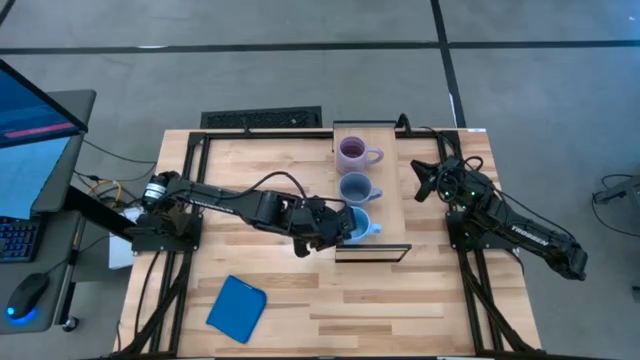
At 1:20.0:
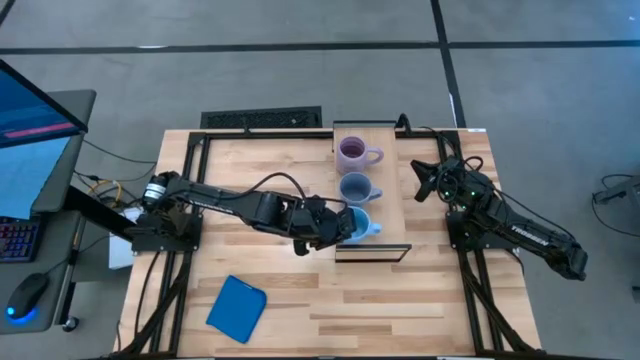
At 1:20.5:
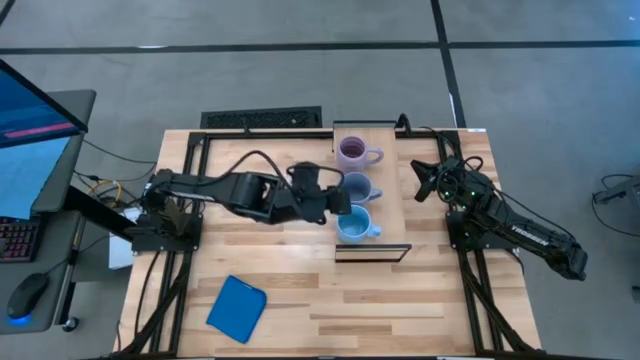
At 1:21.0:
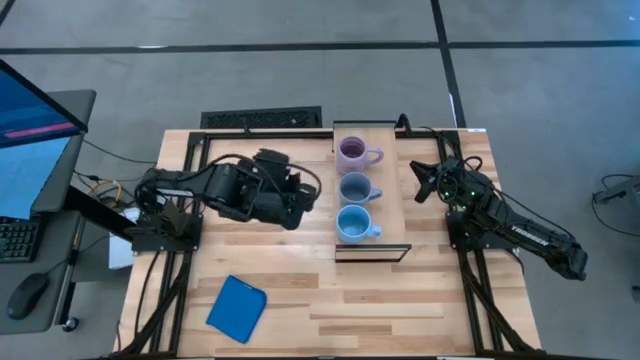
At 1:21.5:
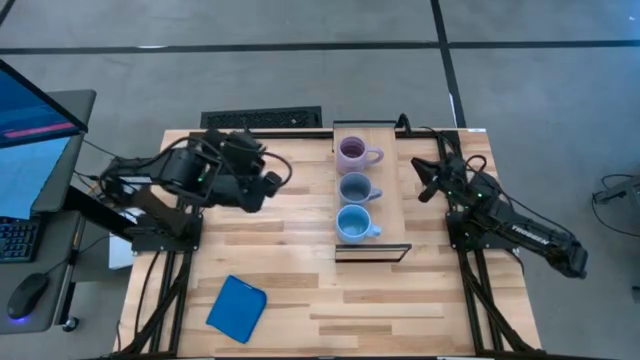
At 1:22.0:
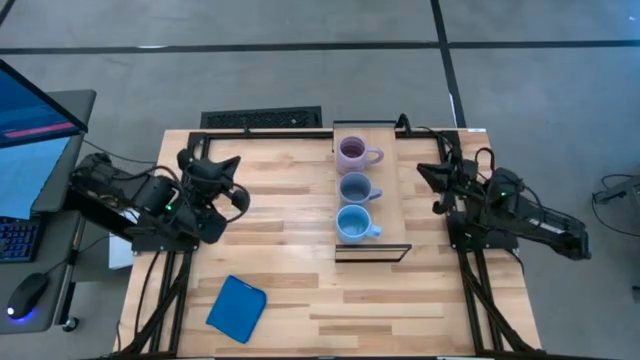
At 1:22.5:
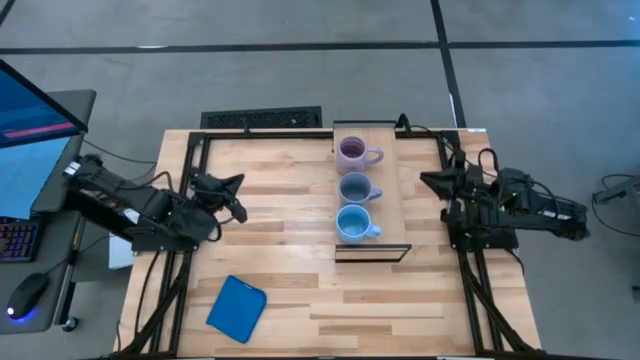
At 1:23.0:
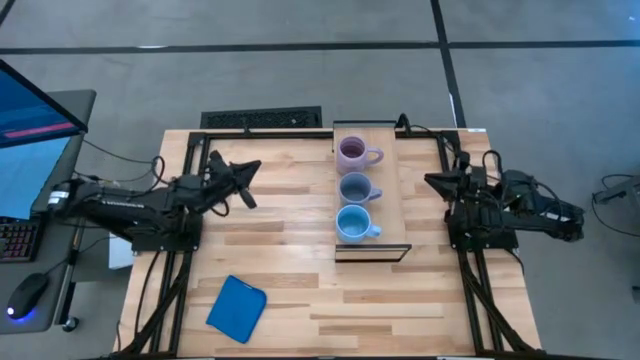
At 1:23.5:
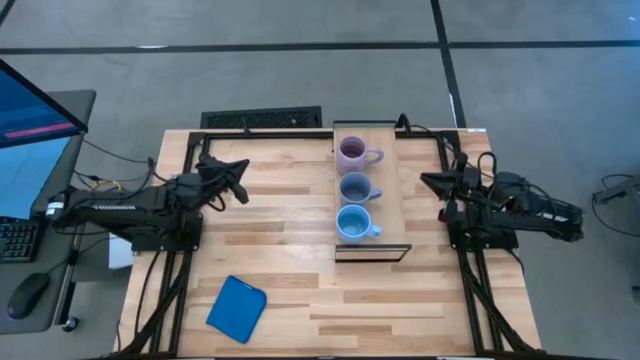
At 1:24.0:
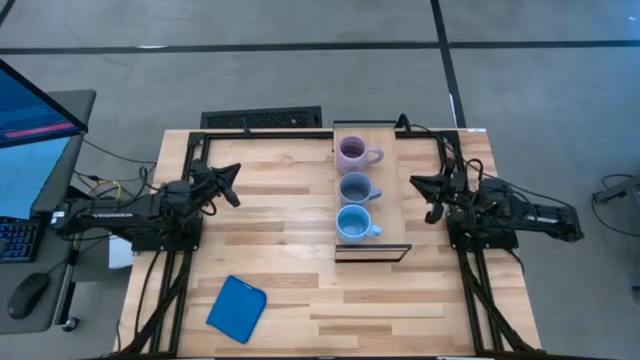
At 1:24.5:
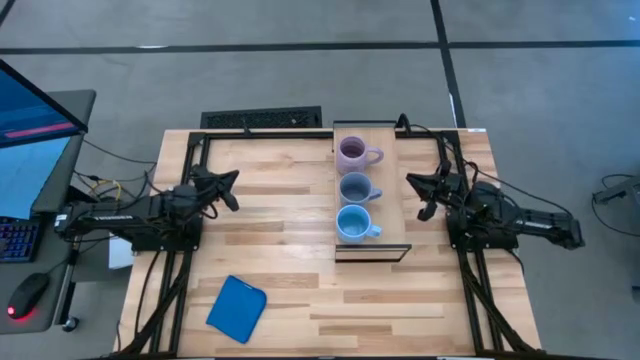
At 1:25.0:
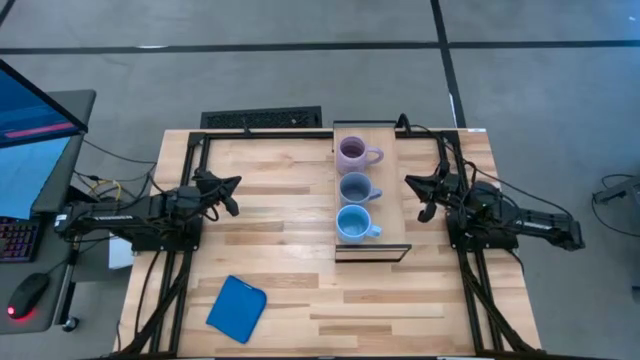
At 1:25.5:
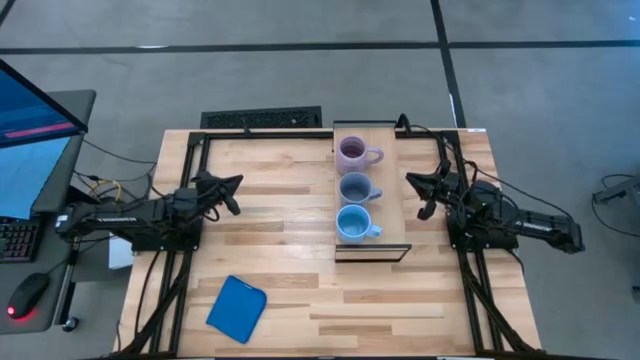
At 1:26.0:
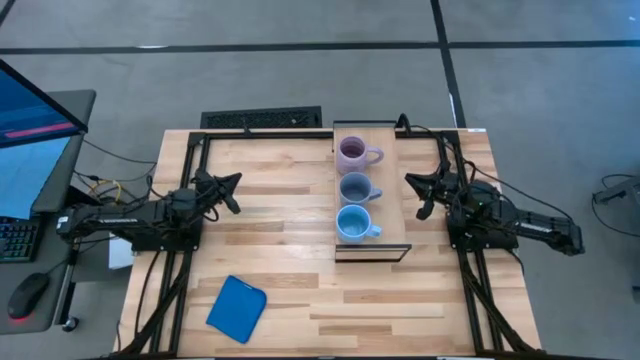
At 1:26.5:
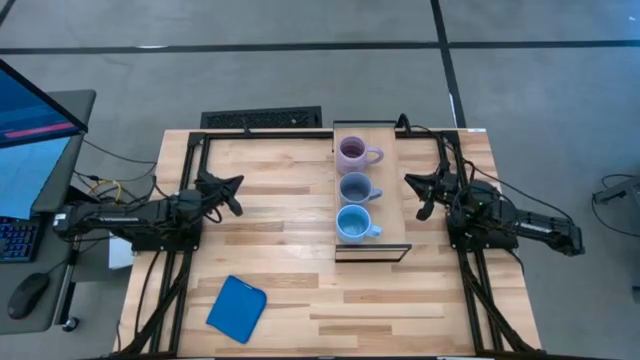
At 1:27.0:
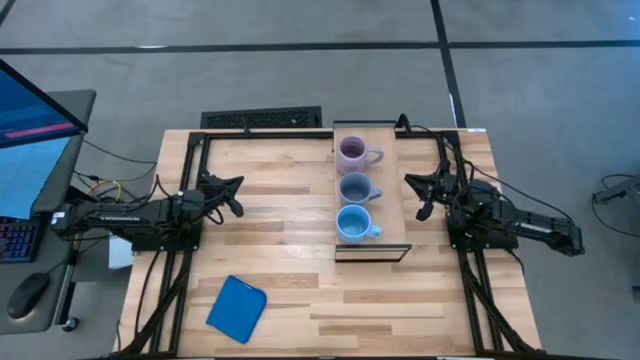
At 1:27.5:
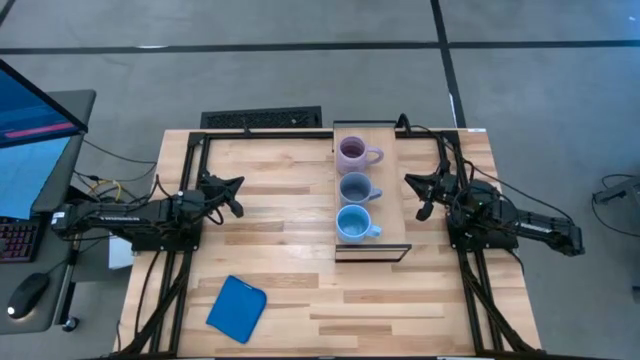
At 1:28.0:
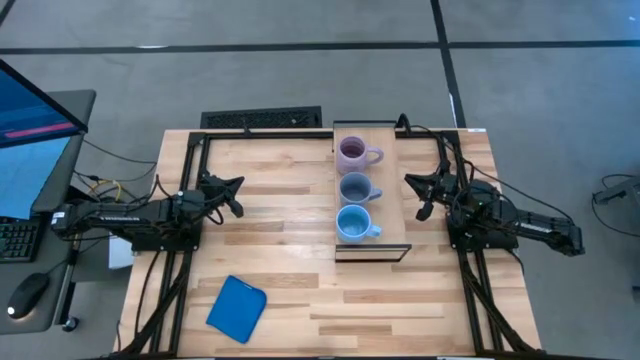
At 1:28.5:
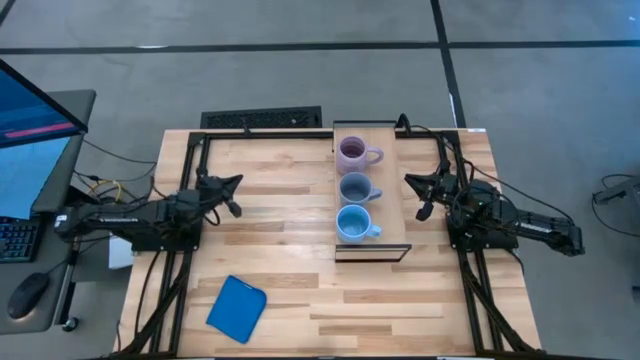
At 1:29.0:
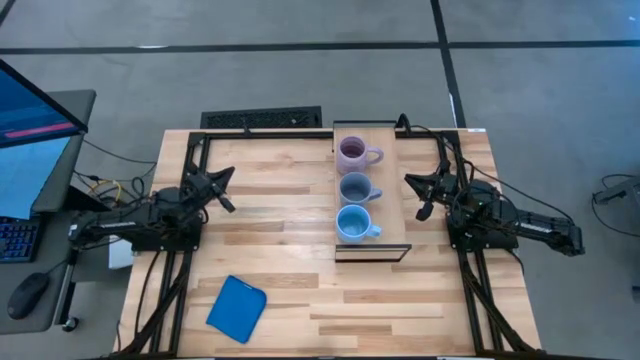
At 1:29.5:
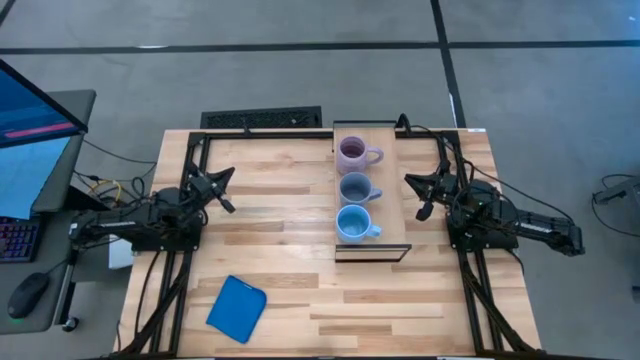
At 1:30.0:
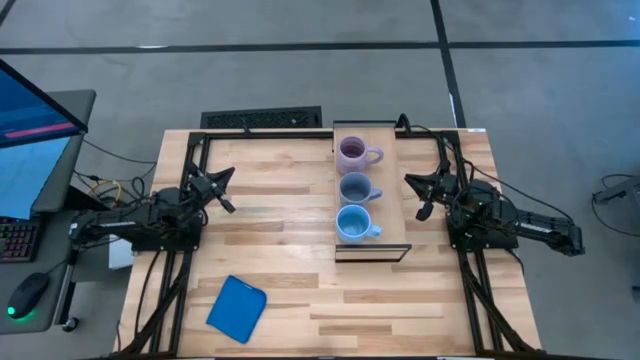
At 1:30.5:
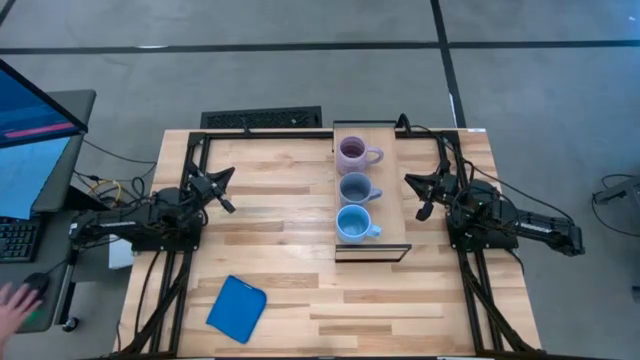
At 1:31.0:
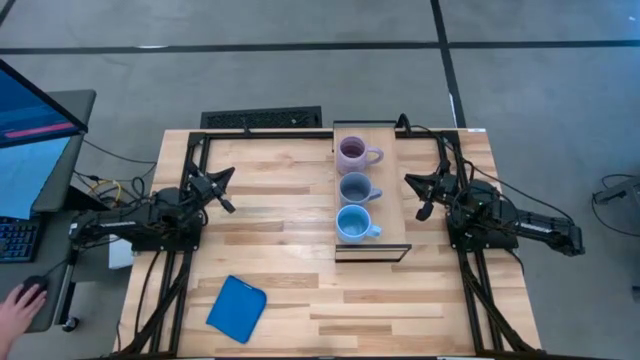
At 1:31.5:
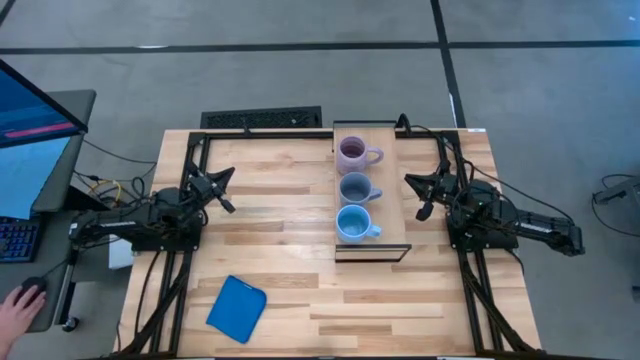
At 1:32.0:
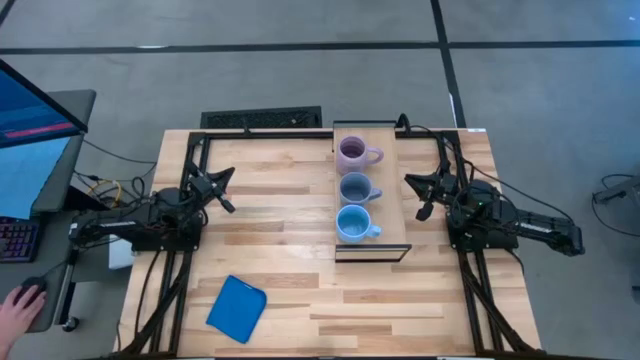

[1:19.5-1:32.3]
Task: Stack small to large cups/mugs on shelf
Return to Home Position

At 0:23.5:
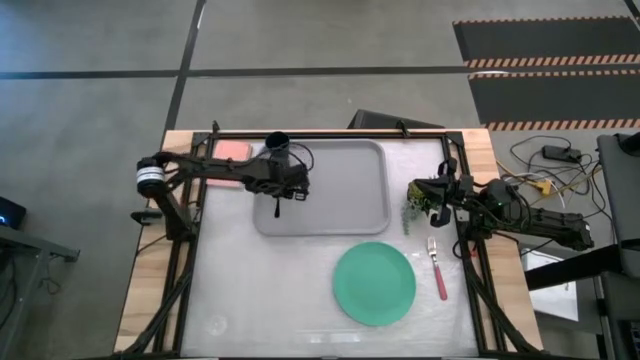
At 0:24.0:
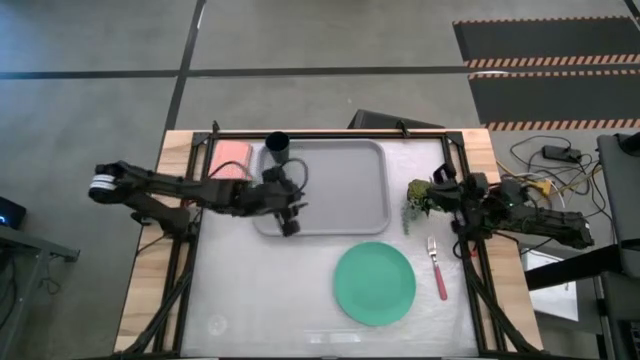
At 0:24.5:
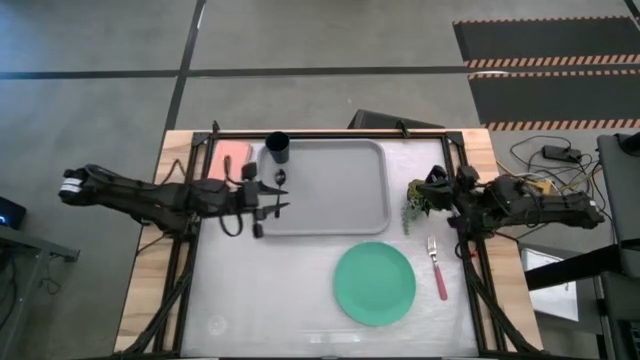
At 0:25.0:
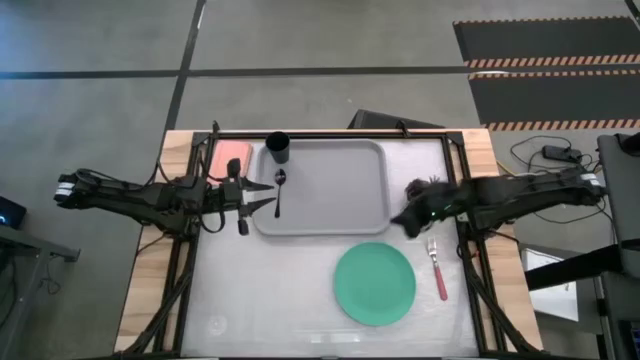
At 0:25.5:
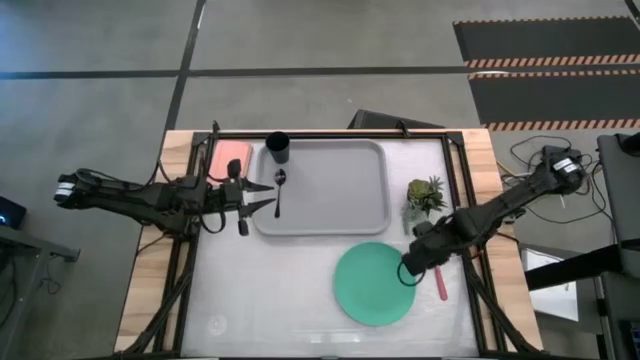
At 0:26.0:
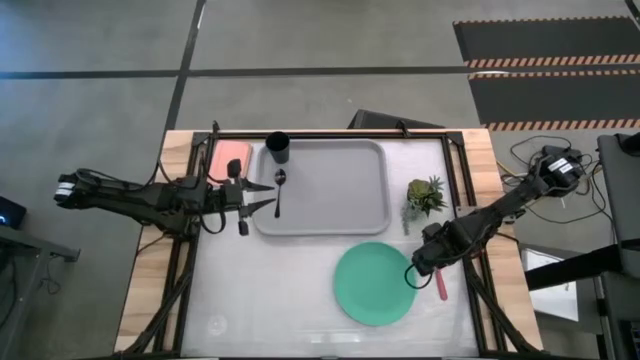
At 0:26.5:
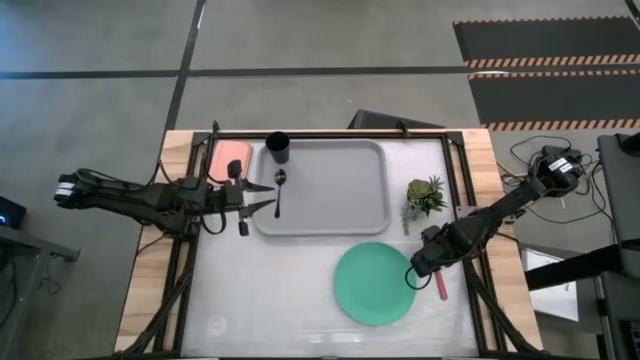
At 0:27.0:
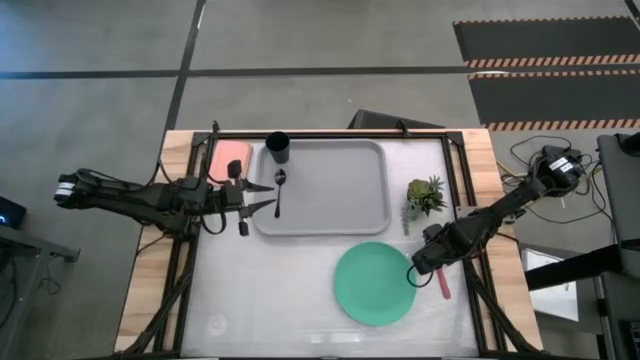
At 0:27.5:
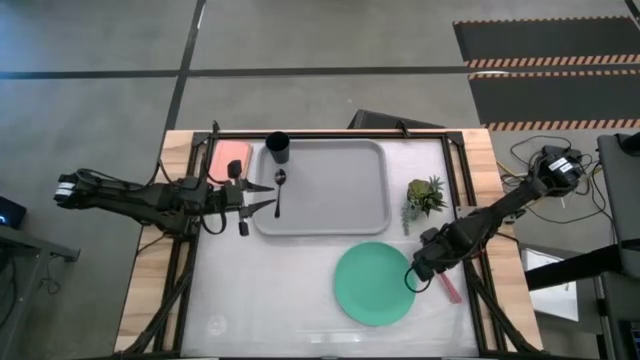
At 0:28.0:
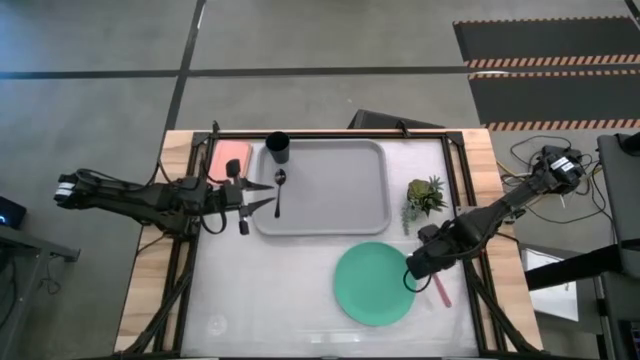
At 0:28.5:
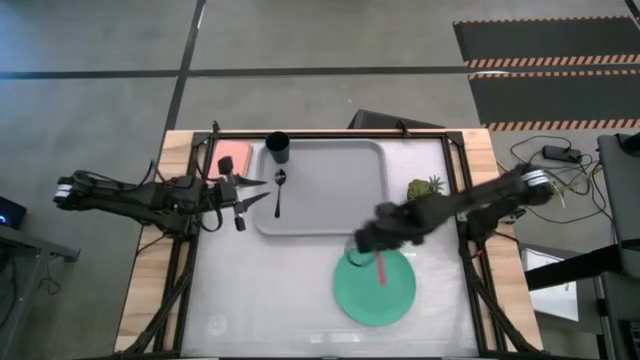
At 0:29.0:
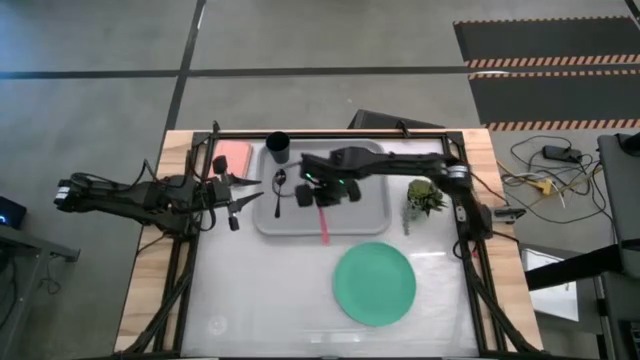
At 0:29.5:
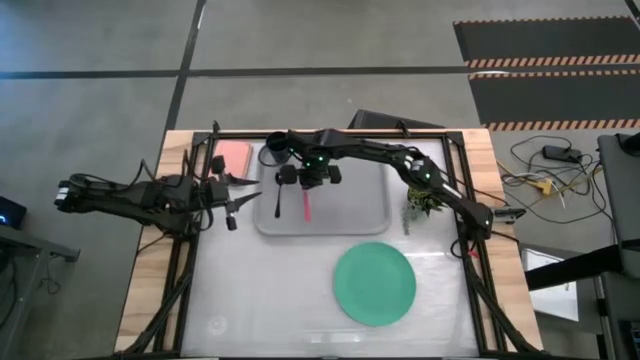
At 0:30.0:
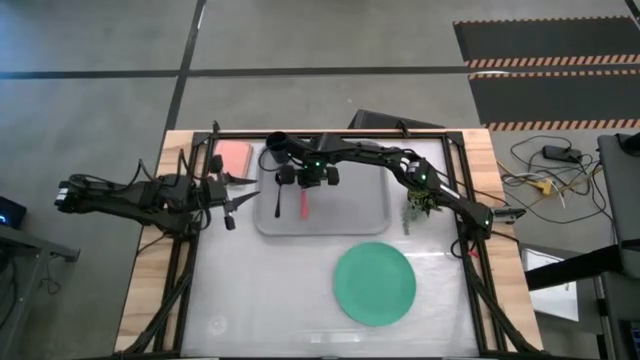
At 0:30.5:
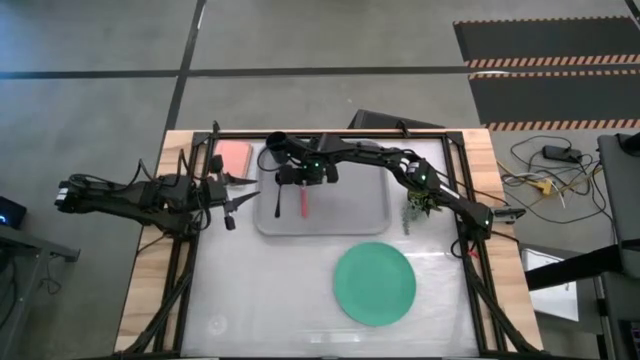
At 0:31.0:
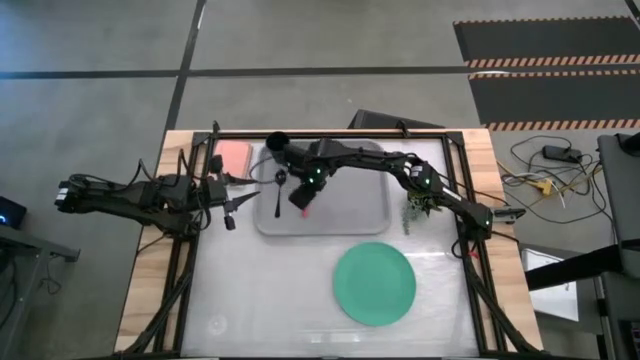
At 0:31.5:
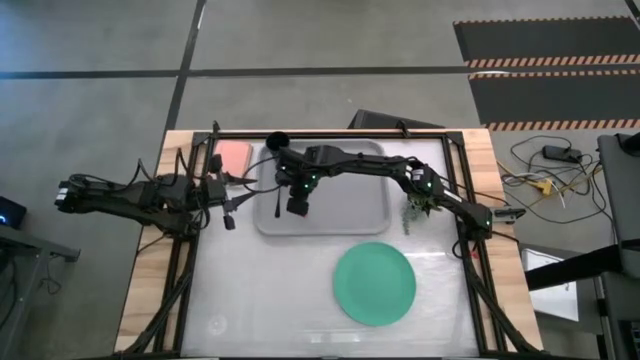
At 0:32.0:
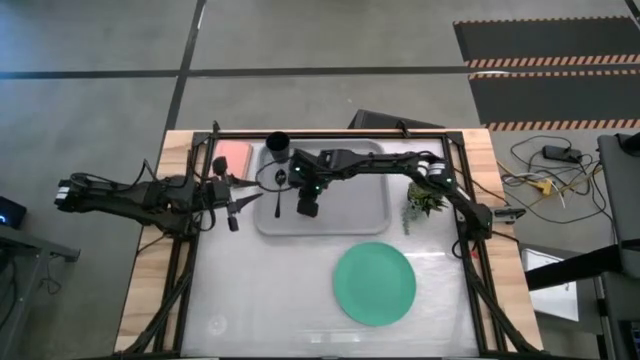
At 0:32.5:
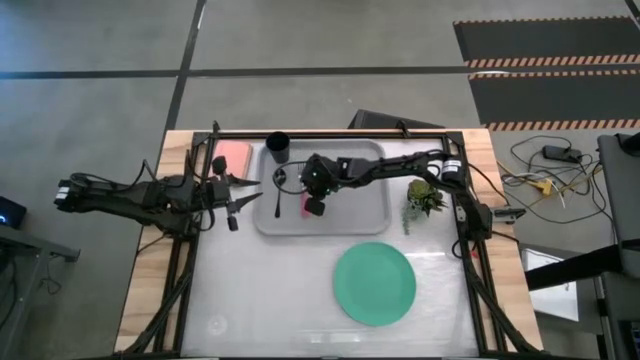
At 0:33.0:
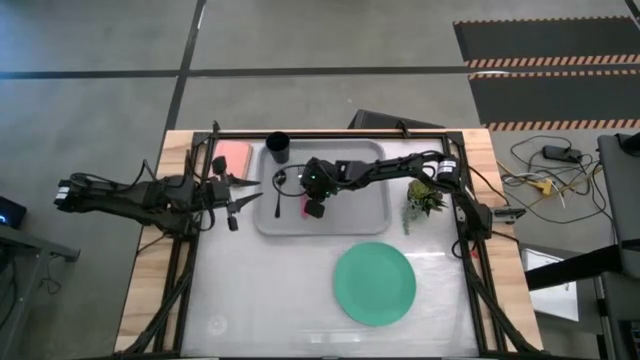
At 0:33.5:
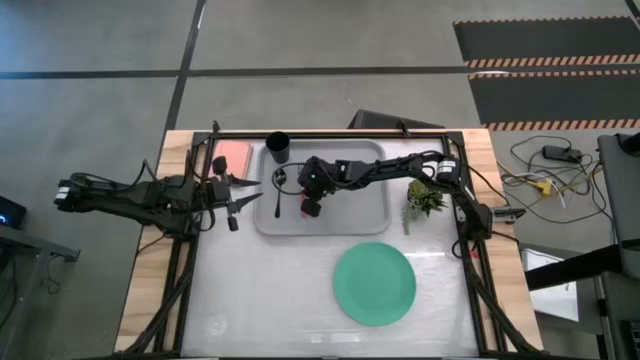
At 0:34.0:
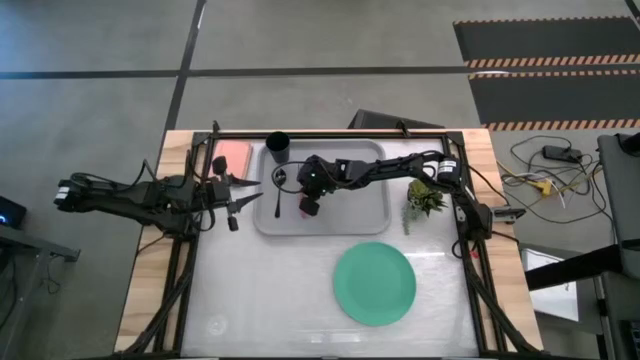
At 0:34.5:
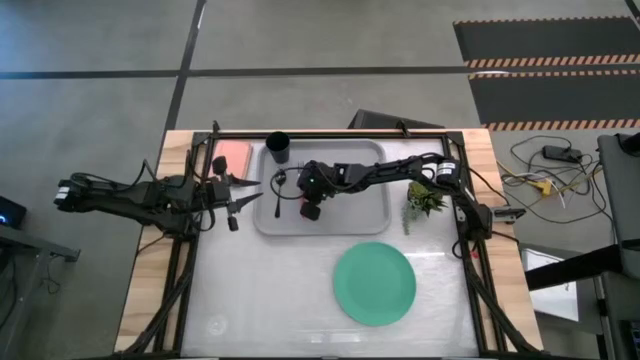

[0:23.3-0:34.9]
Task: Pick and place plate/cup/fork/spoon on tray
Put the pink fork on the gray serving tray left beside the black spoon
